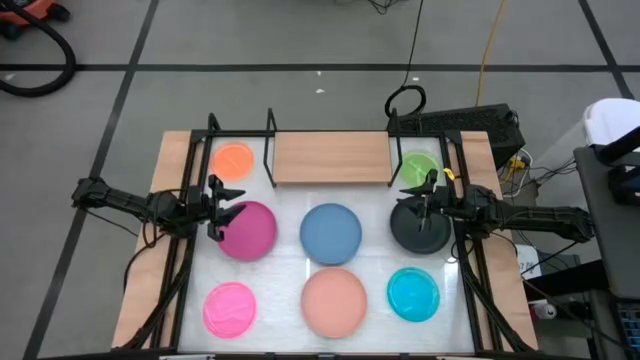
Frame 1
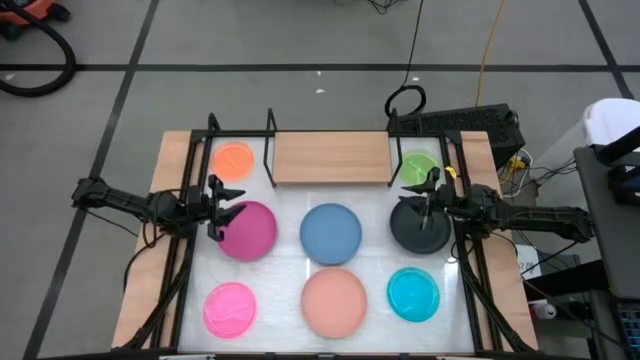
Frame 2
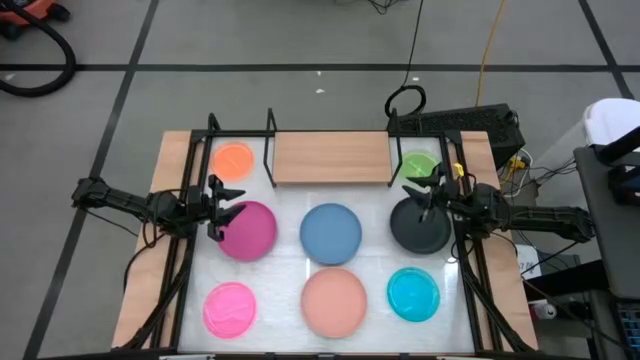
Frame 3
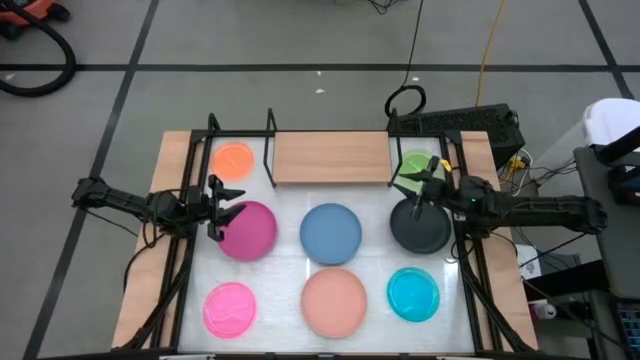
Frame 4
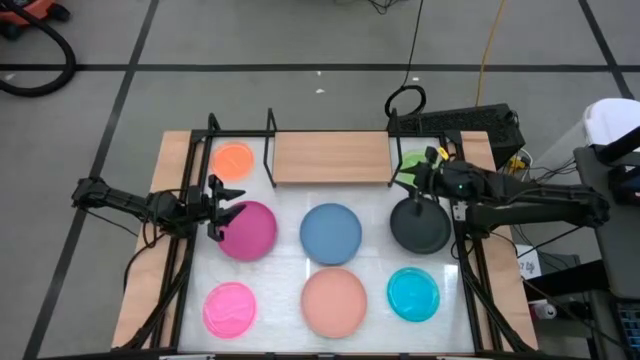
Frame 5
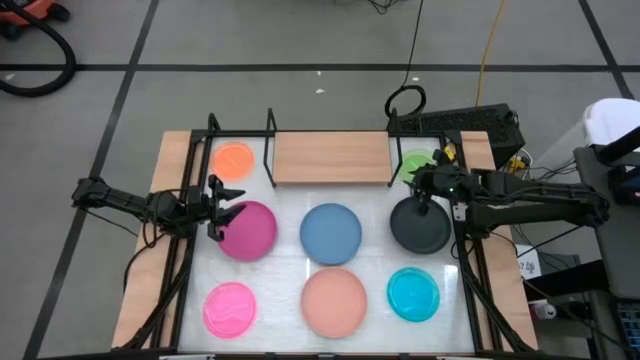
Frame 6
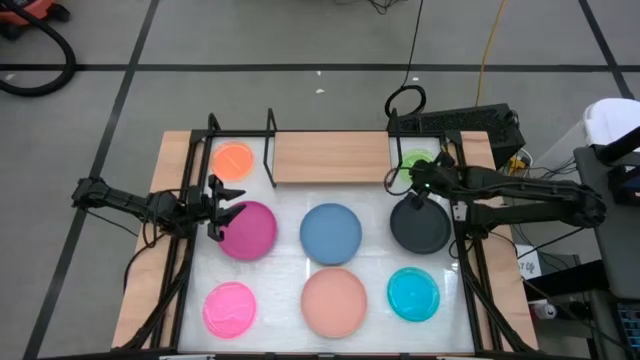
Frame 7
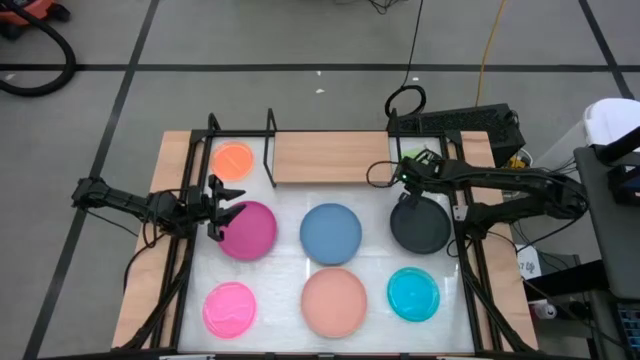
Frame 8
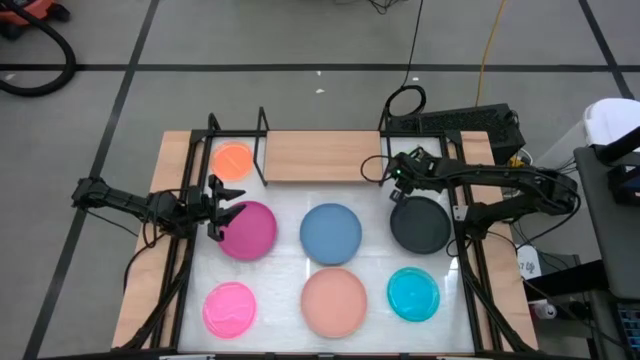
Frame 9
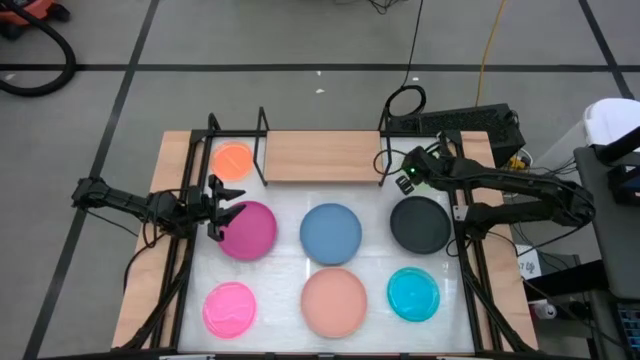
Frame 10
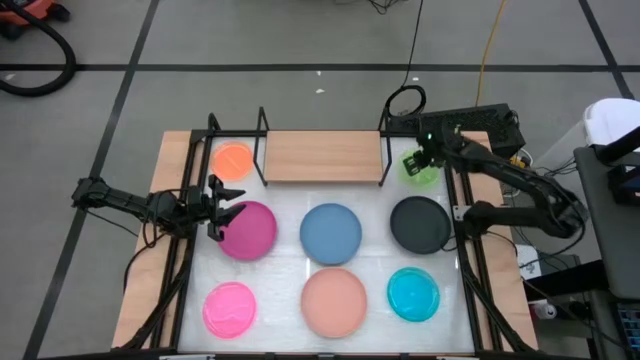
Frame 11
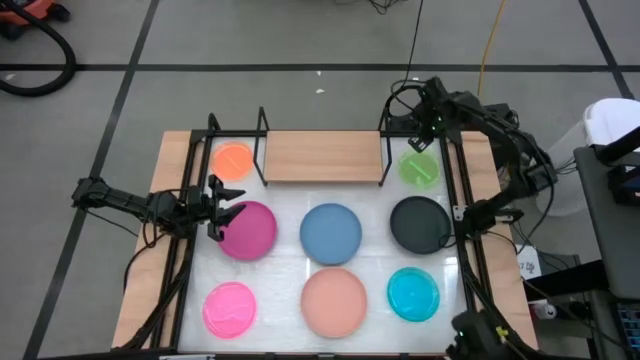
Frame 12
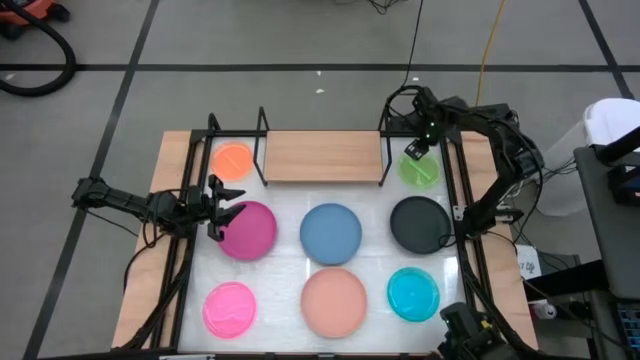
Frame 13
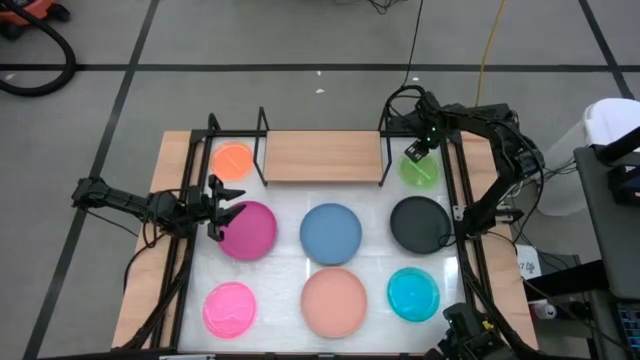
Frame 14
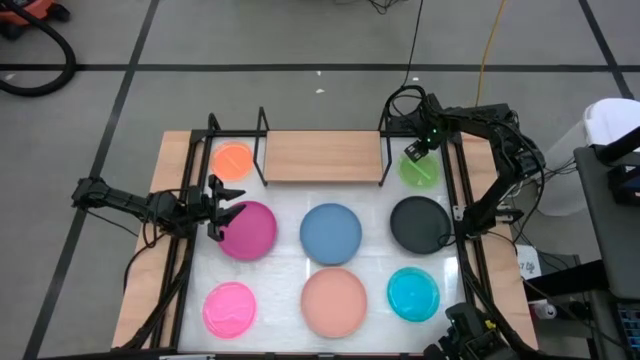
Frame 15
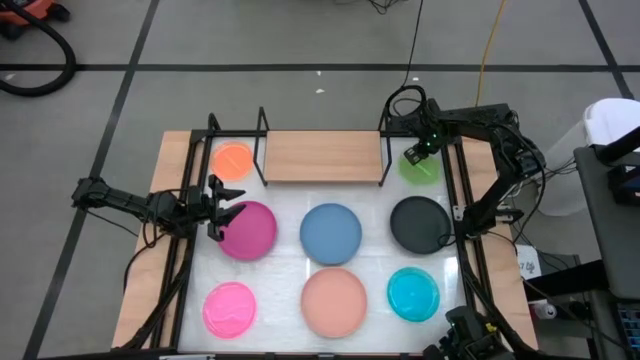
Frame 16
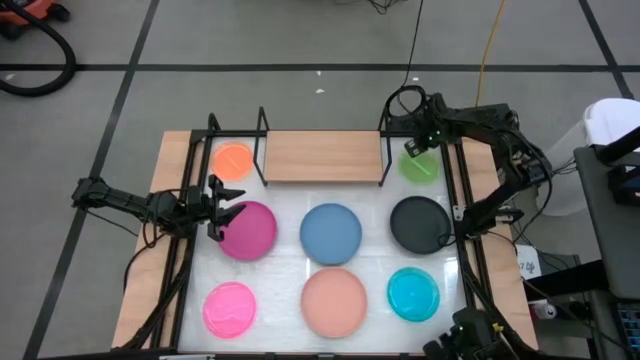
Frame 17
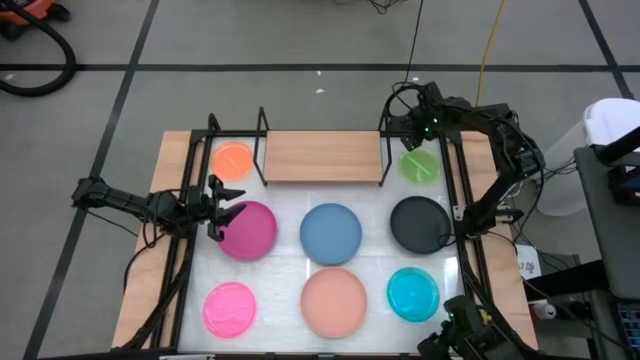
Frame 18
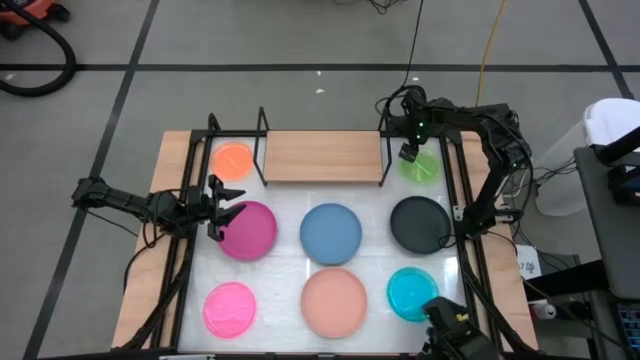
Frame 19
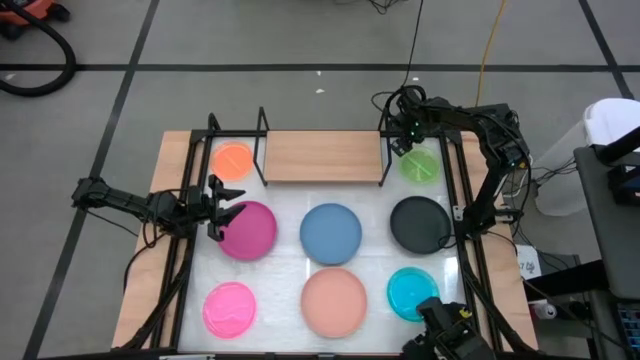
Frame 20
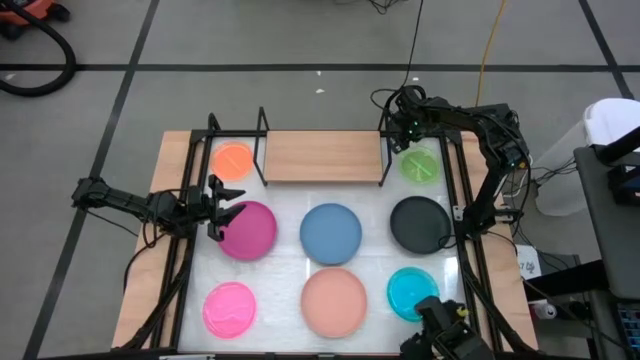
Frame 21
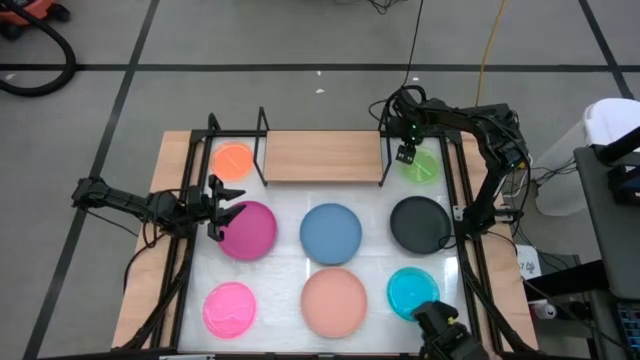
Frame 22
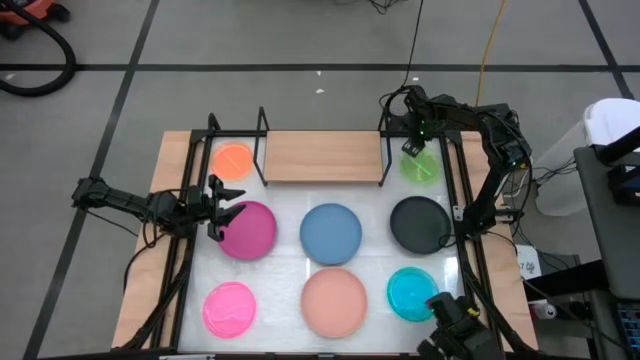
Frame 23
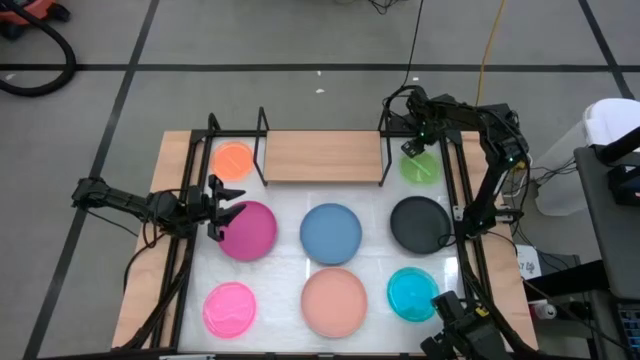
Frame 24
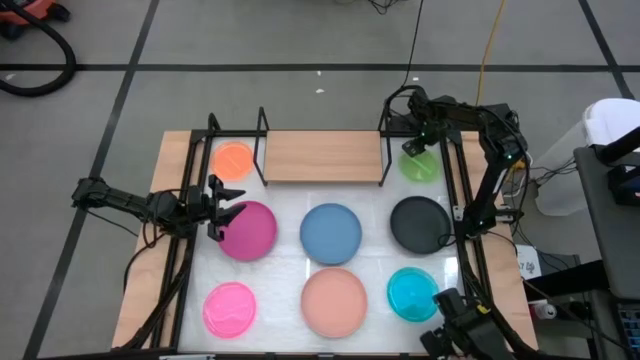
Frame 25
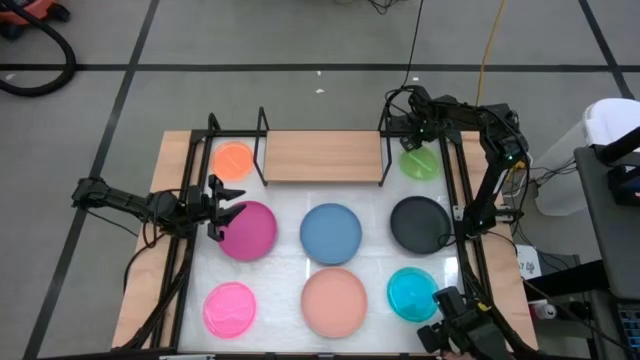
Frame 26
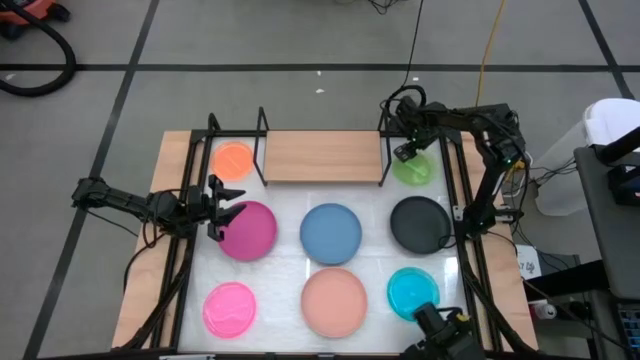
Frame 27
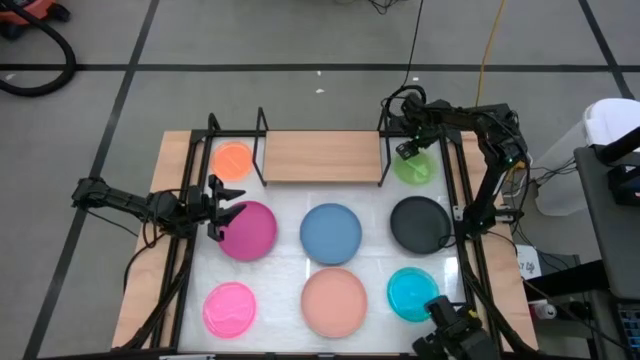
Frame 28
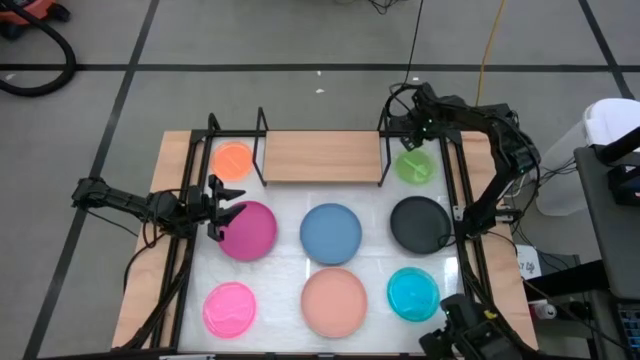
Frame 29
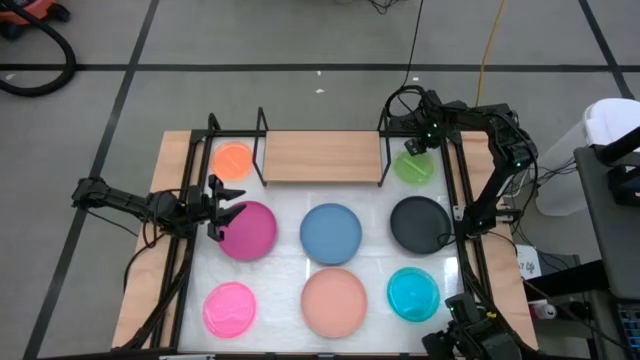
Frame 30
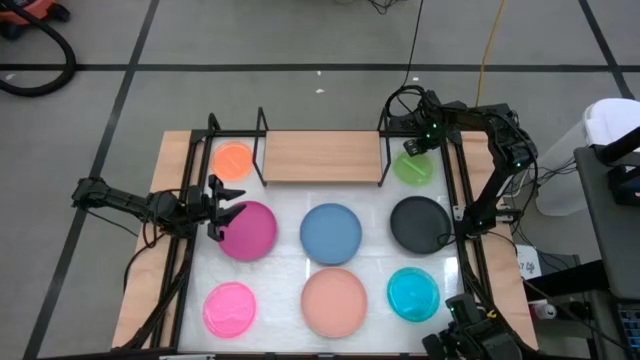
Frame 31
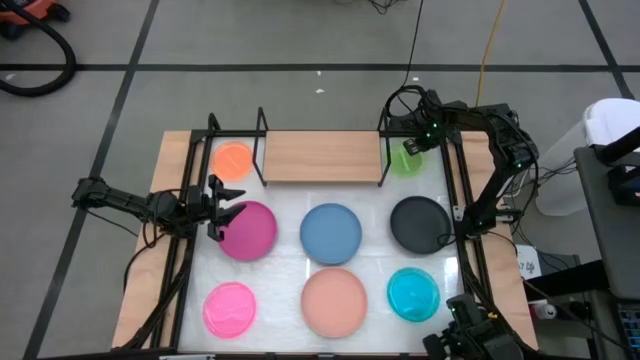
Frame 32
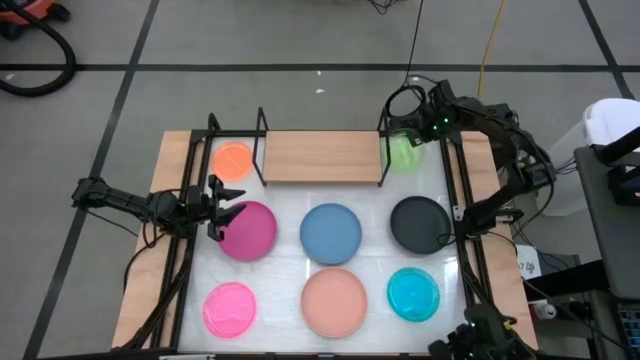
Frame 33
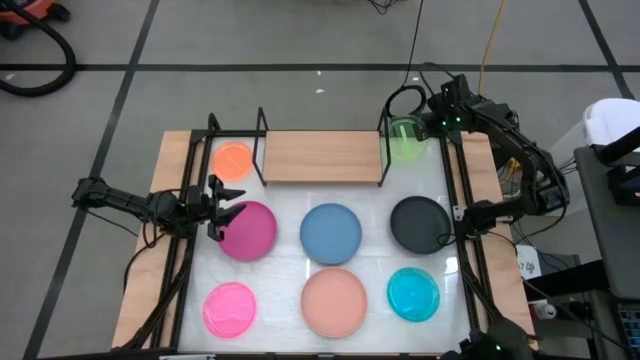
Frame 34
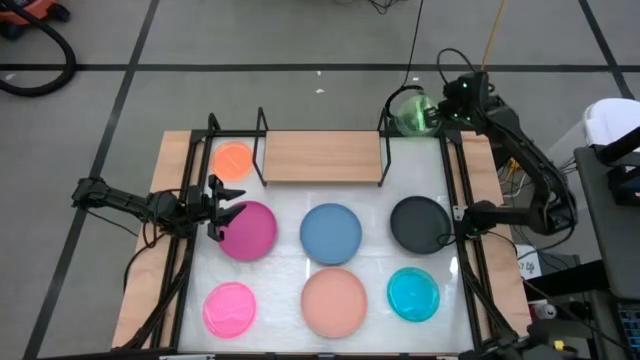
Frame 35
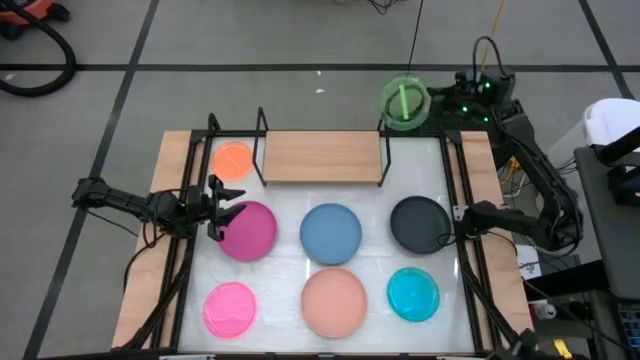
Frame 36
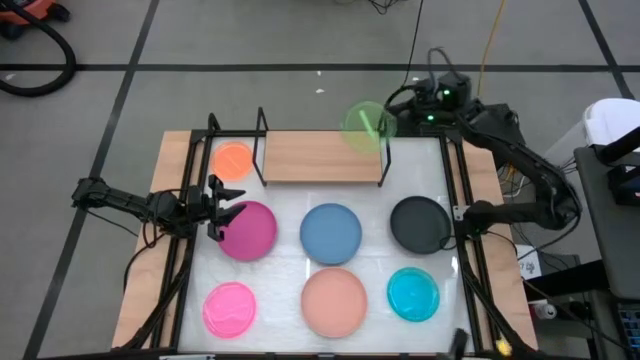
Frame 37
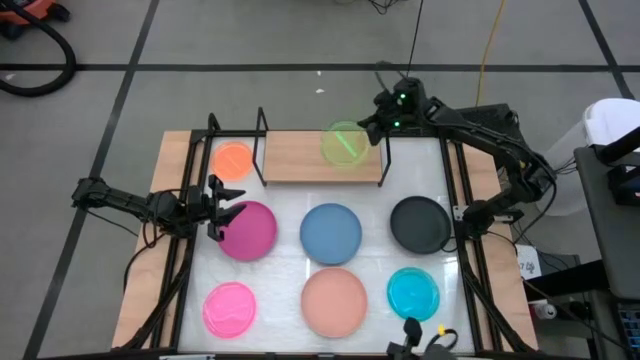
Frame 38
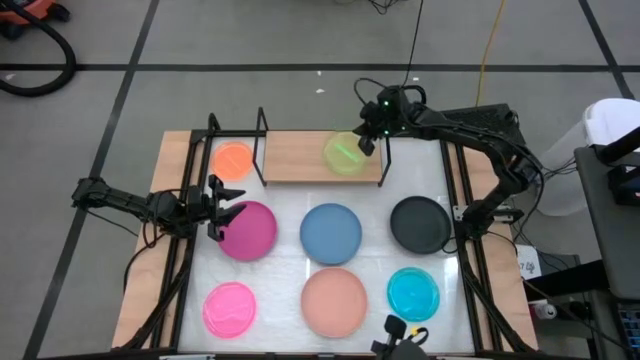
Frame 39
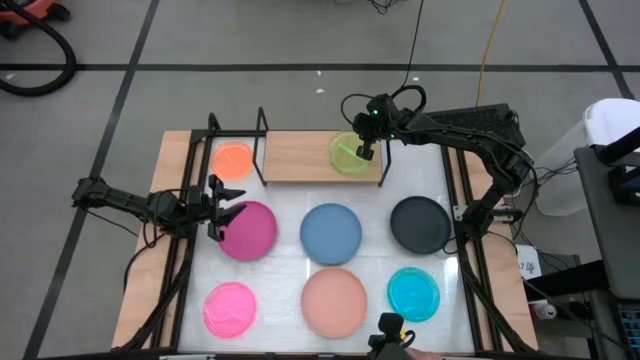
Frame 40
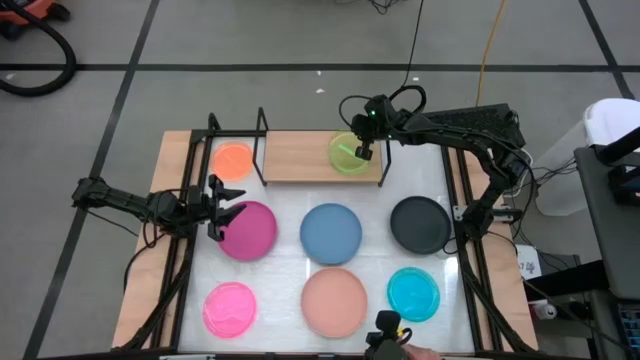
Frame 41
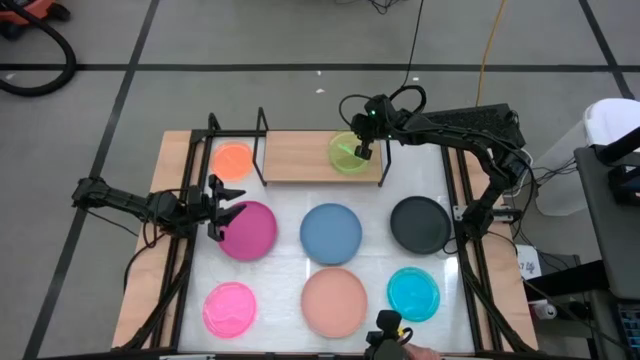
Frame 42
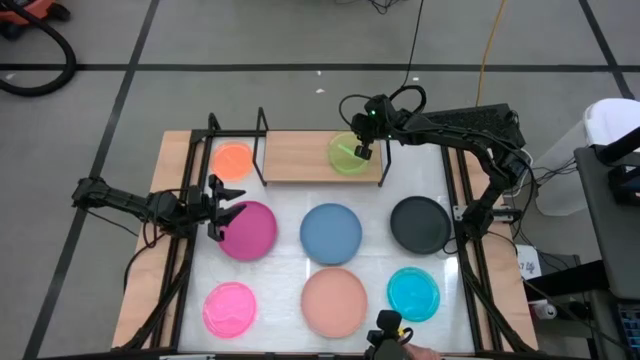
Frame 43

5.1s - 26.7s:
Task: Place and stack plates onto a shelf
Put the green plate on the shelf
